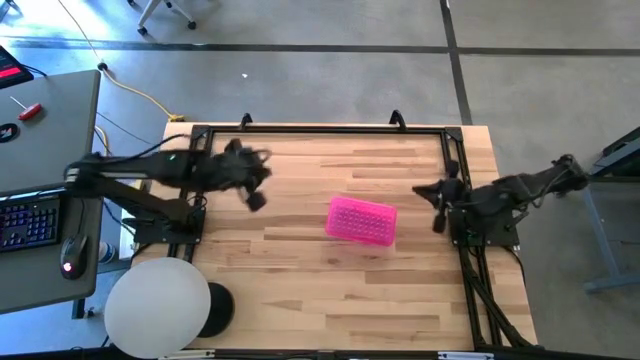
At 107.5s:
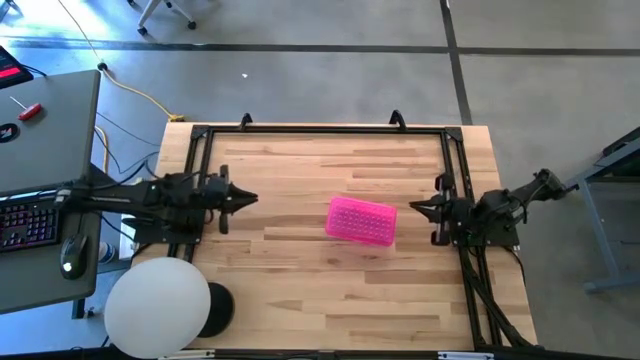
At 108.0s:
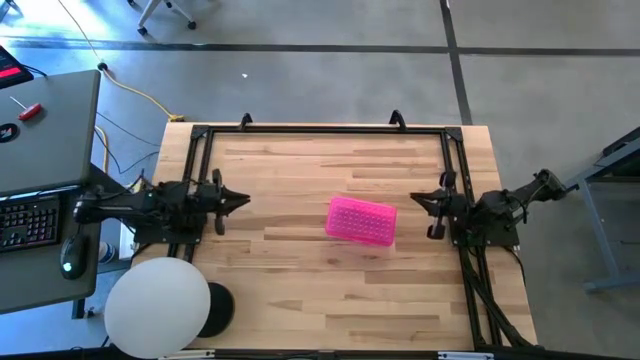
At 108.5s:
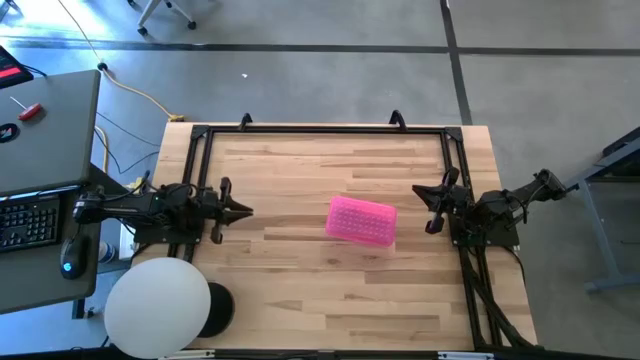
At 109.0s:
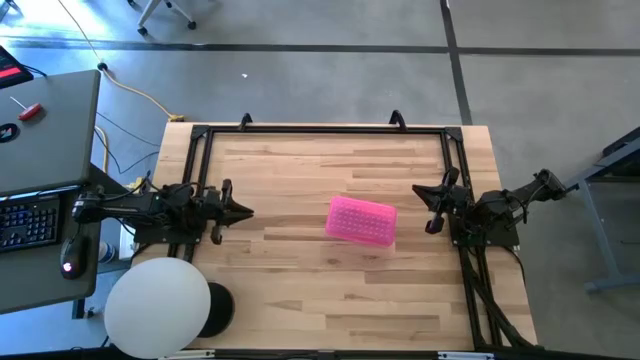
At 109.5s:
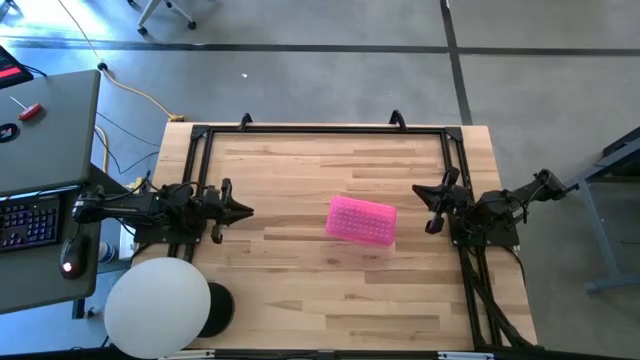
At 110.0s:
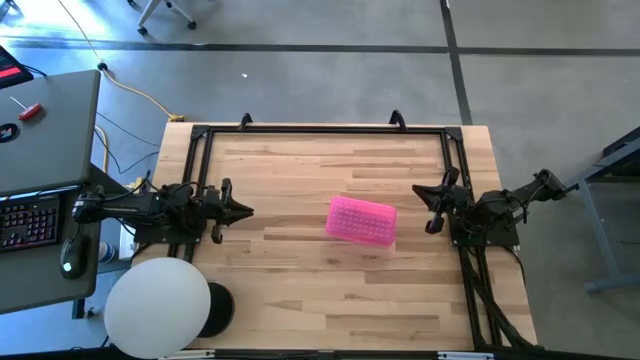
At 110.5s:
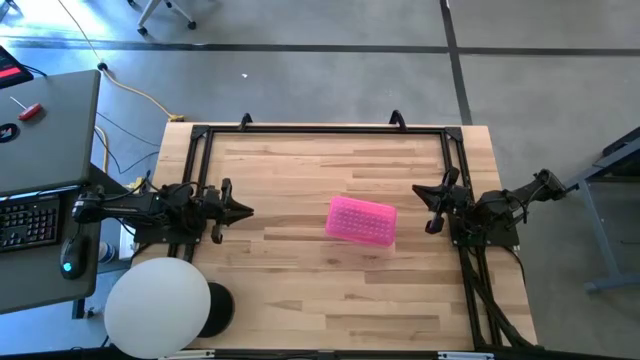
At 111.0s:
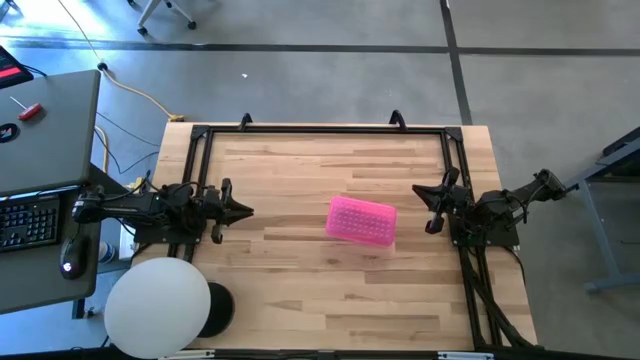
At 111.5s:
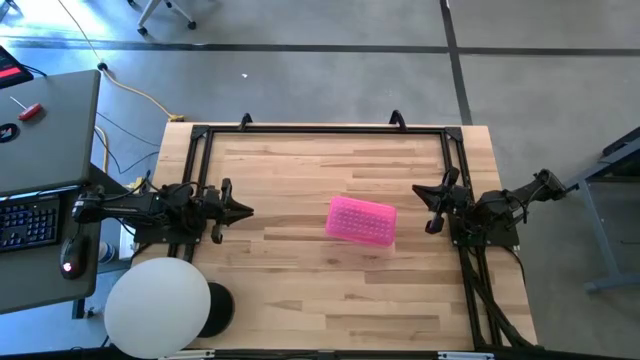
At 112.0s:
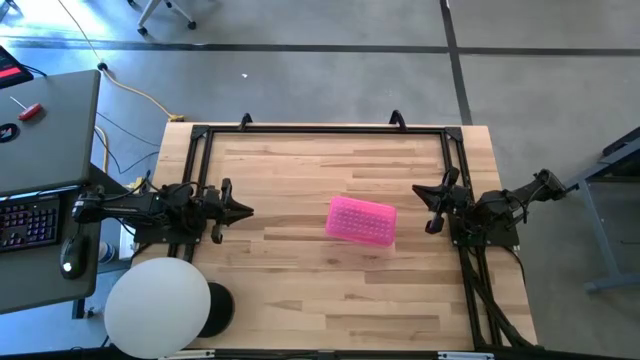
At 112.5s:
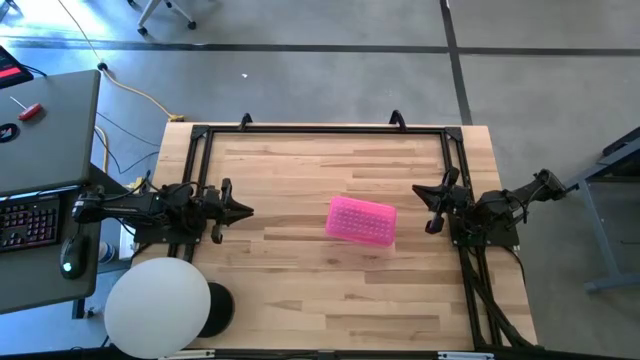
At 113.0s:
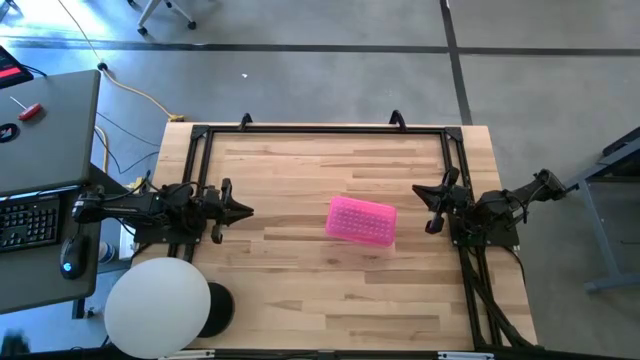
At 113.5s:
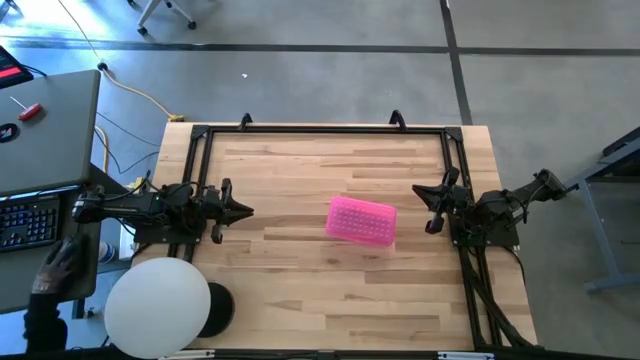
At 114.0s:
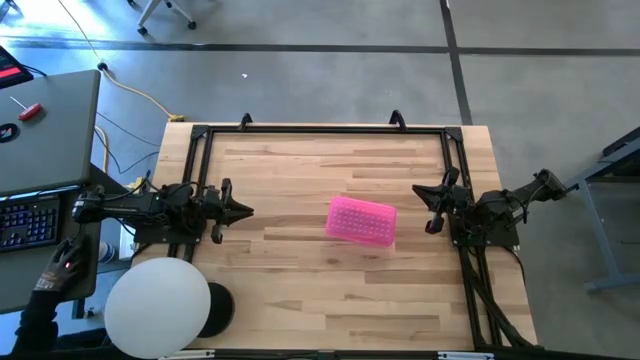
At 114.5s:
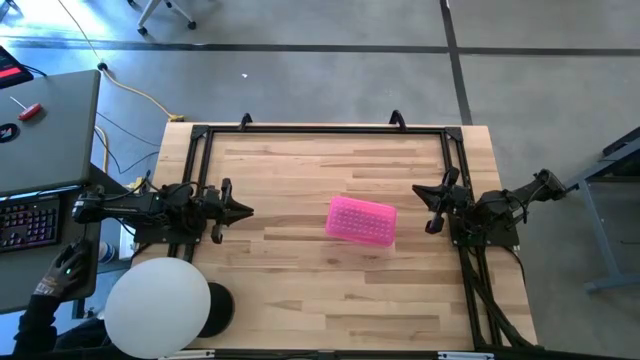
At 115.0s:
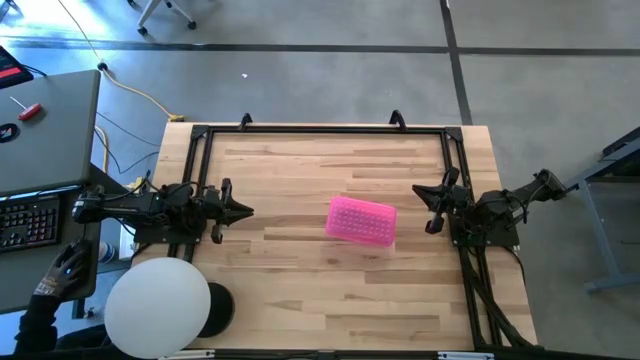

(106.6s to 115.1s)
Task: Pick & place school supplies into a supply box
Return to Home Position

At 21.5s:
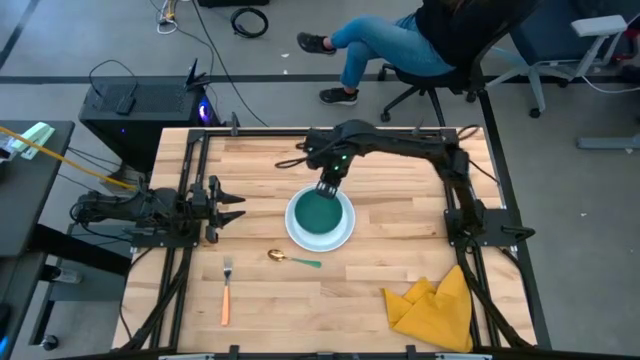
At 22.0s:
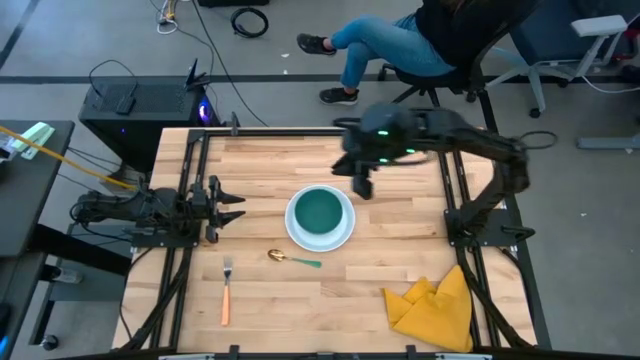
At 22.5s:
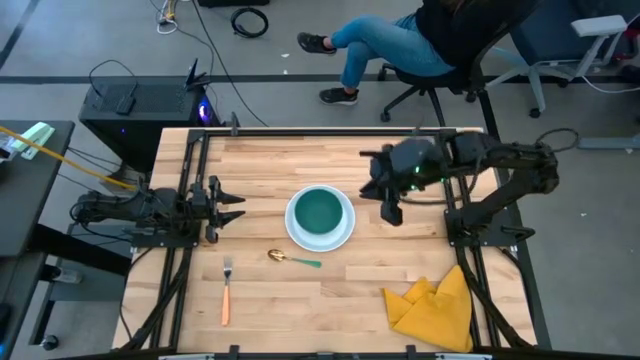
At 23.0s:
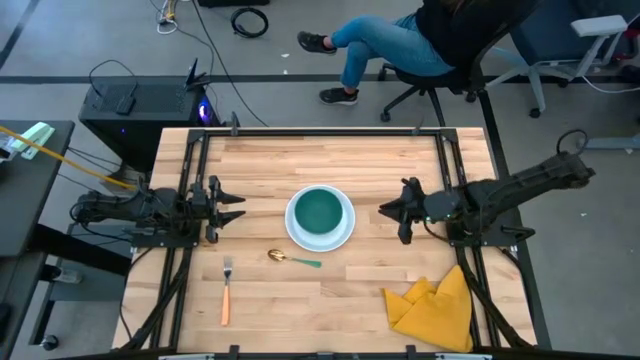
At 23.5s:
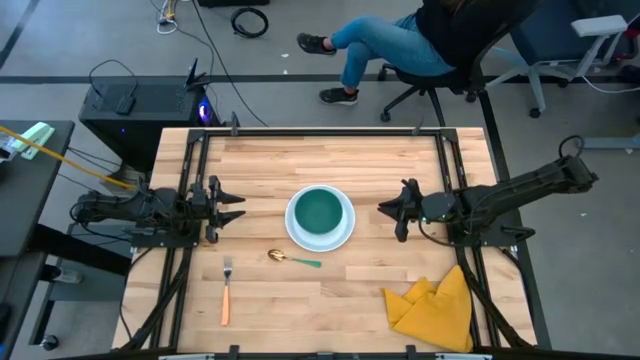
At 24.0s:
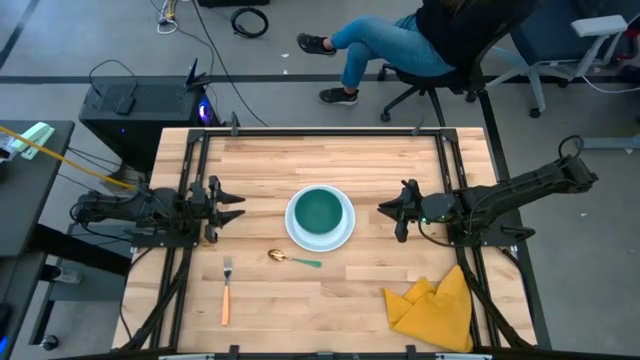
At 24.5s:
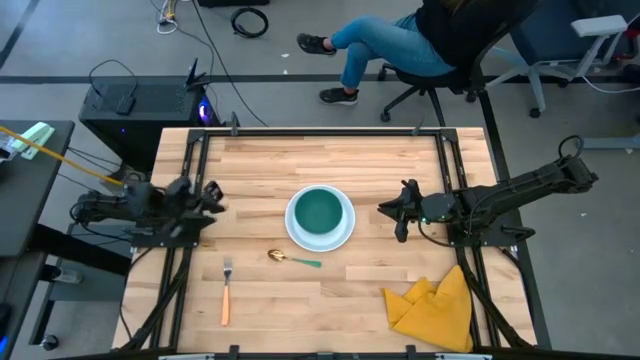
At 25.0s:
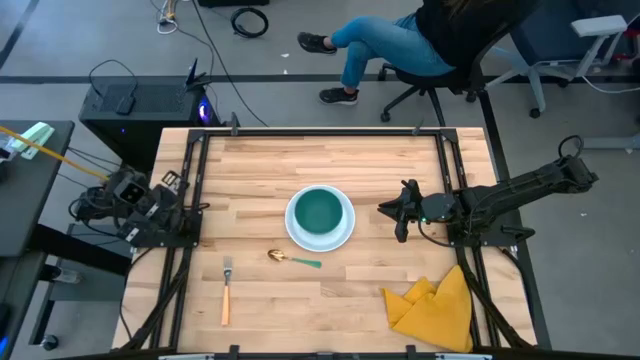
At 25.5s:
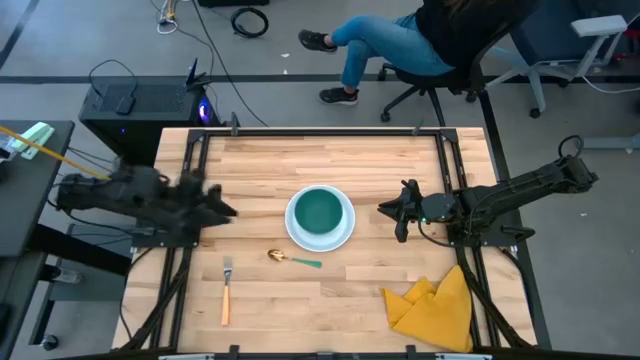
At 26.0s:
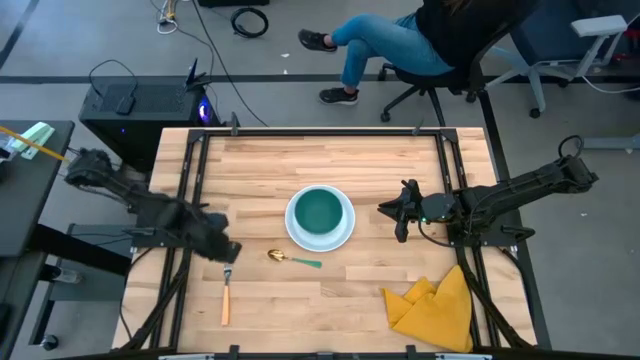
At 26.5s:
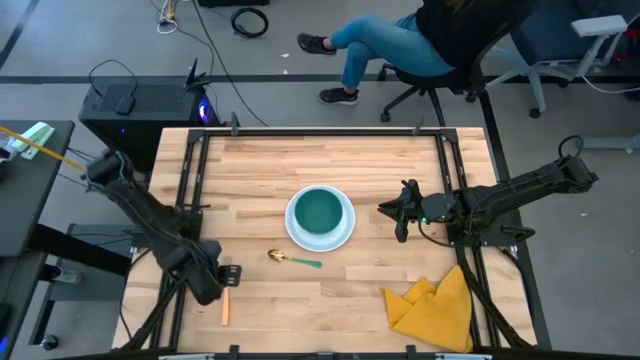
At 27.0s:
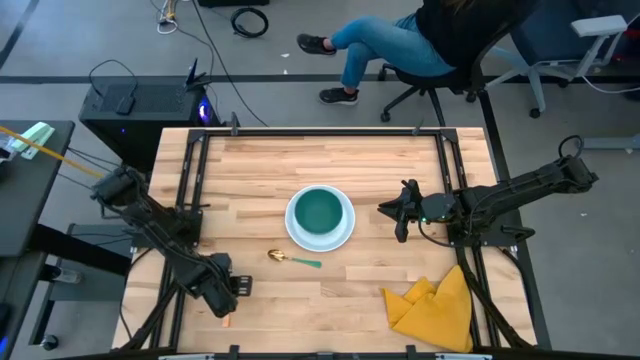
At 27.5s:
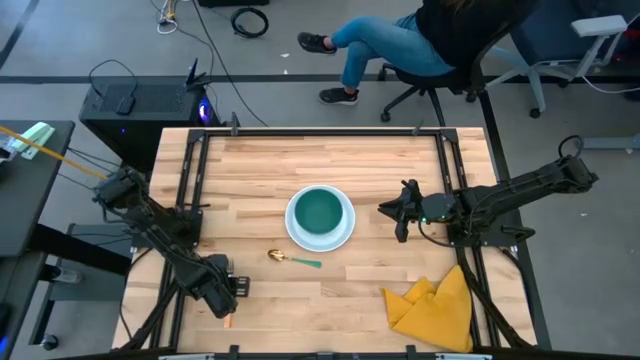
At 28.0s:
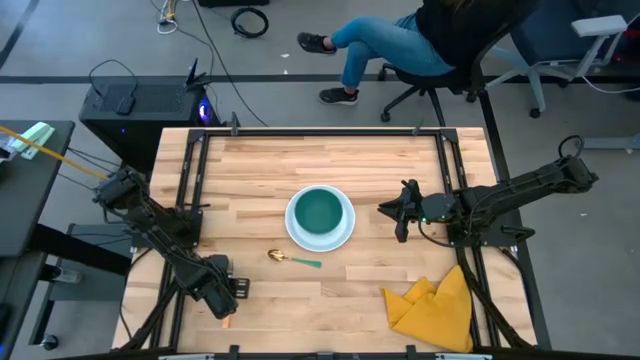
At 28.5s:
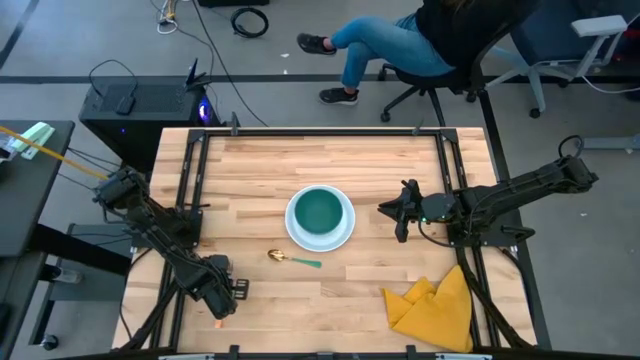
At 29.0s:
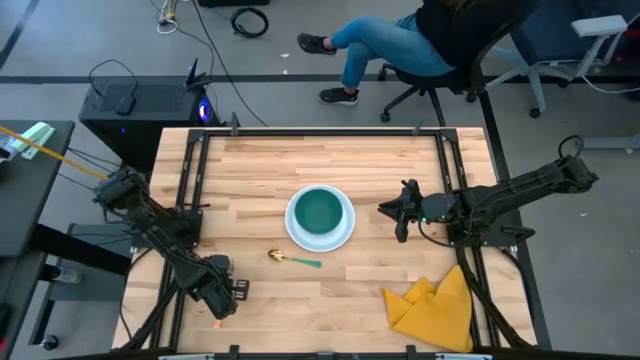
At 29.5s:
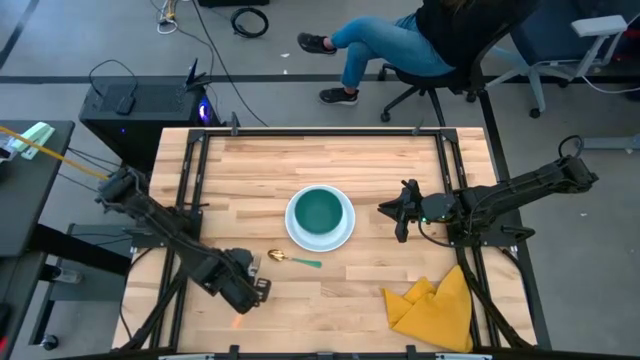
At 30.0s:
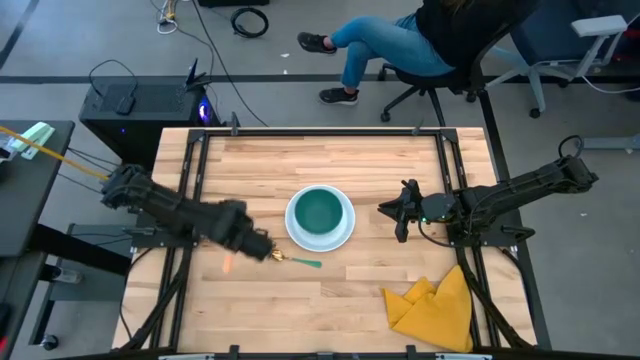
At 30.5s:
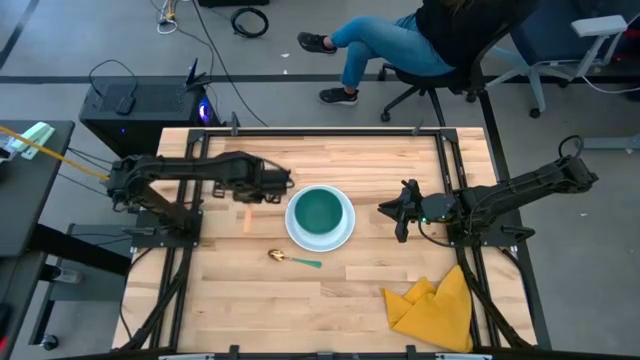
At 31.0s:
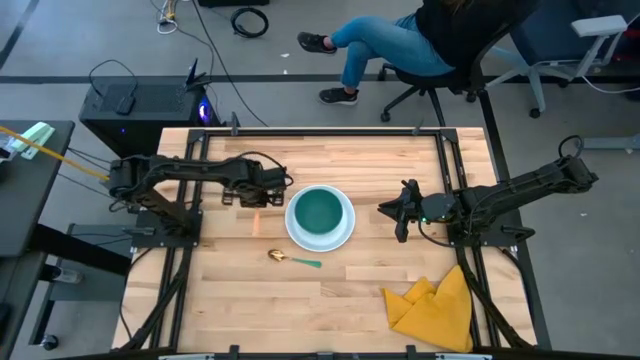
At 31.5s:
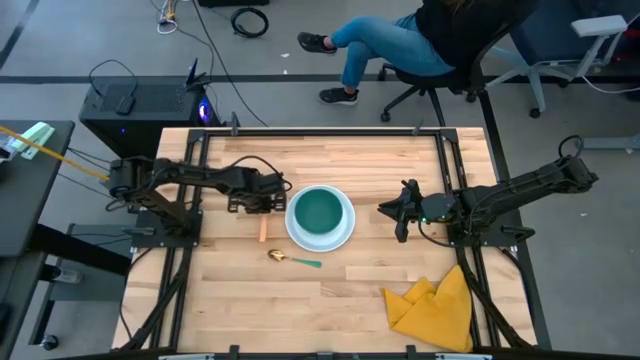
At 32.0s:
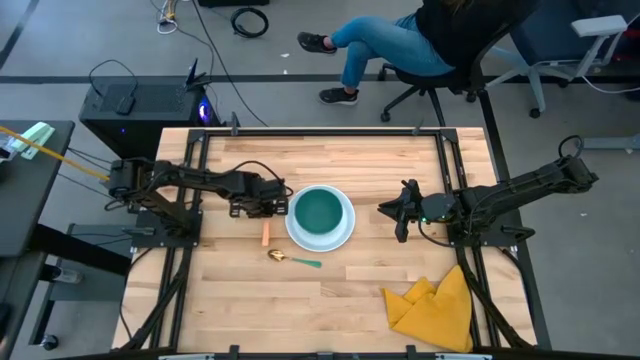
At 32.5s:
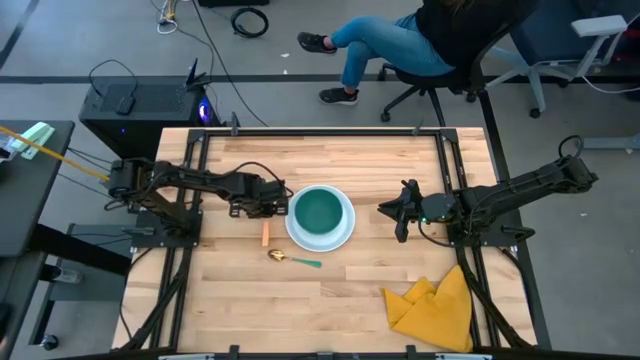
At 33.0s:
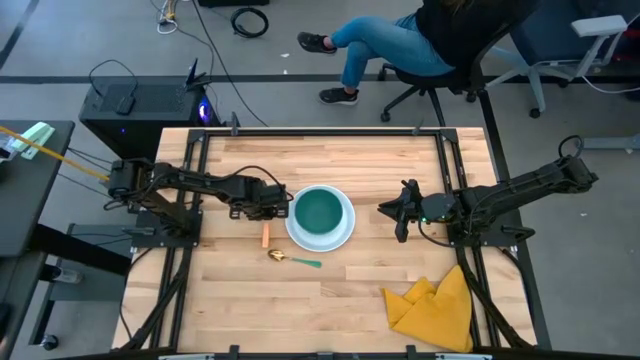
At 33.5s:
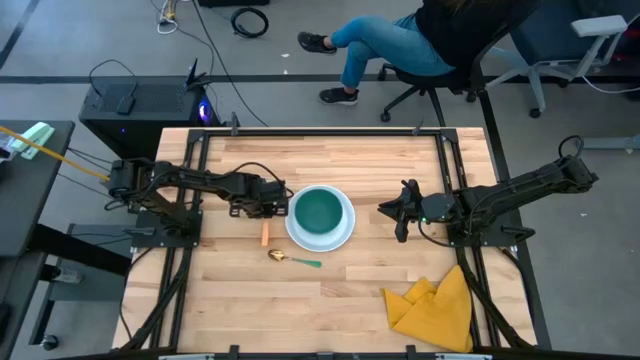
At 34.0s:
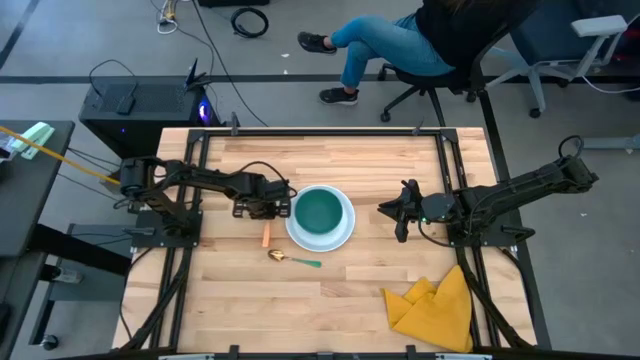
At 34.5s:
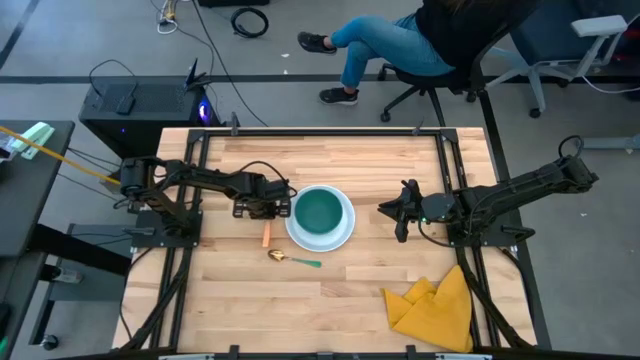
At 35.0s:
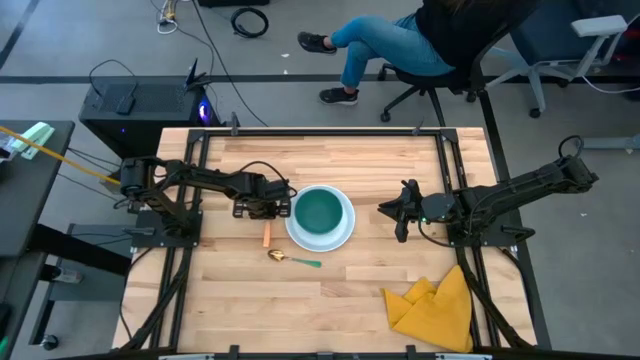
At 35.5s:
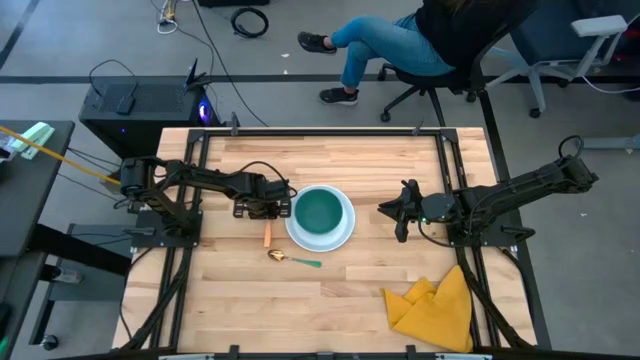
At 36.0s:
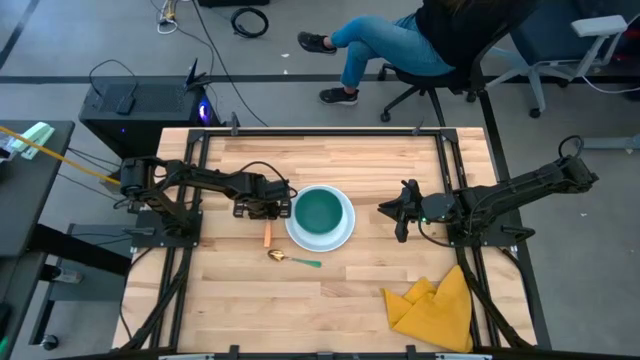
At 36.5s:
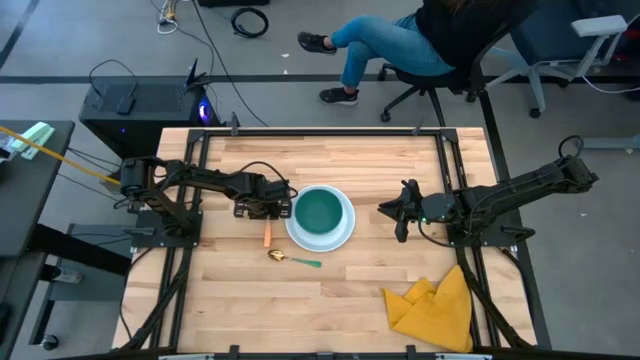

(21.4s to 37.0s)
Task: Set table place
Put the orange fork on the left of the white plate
